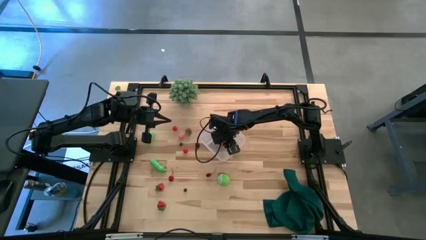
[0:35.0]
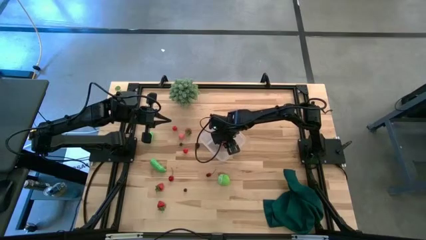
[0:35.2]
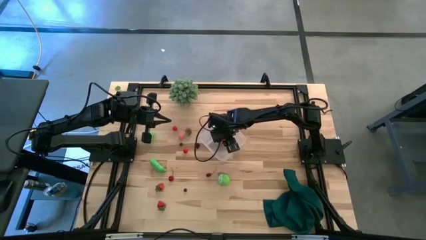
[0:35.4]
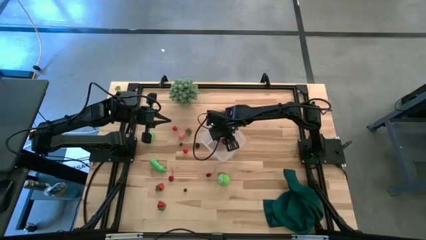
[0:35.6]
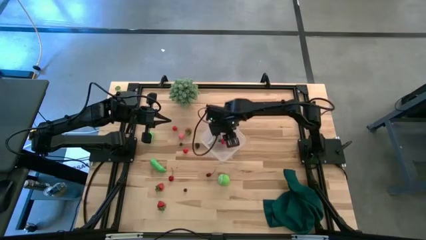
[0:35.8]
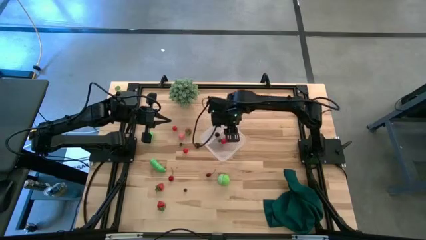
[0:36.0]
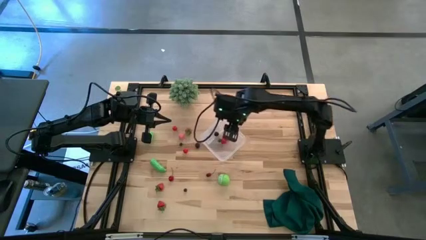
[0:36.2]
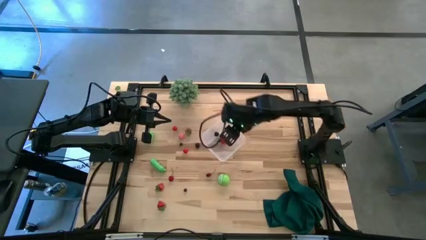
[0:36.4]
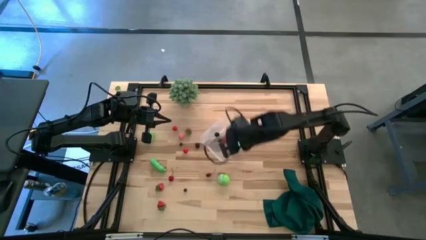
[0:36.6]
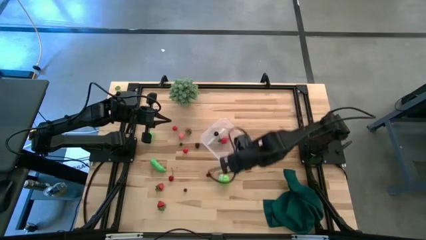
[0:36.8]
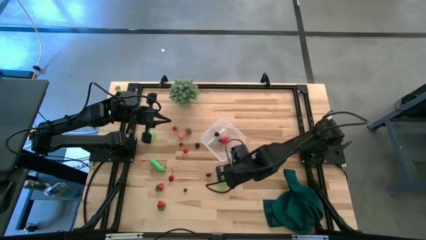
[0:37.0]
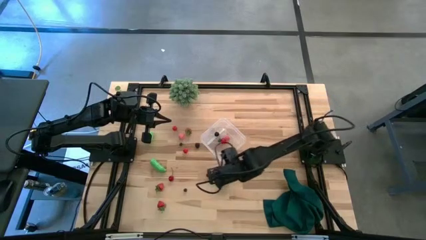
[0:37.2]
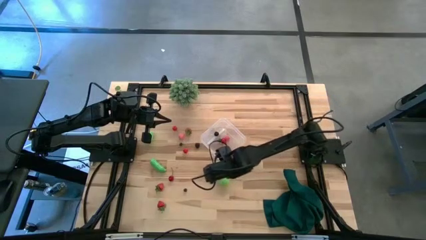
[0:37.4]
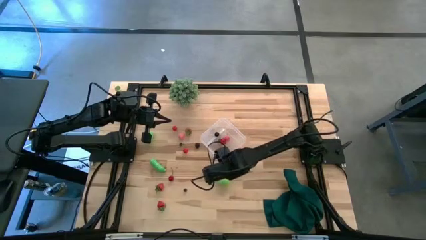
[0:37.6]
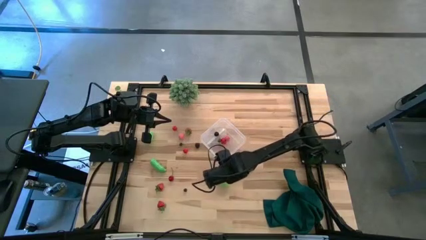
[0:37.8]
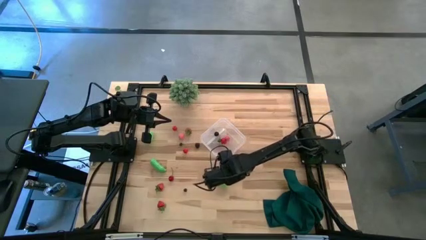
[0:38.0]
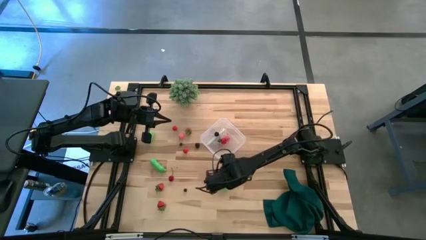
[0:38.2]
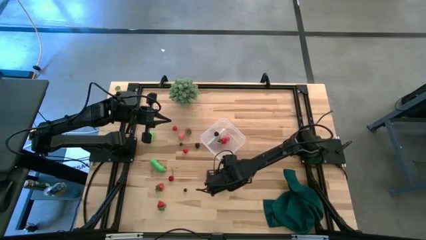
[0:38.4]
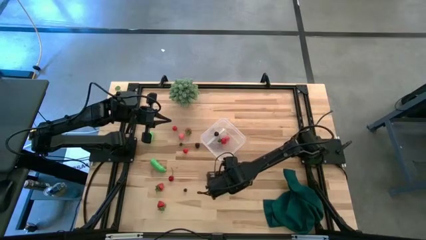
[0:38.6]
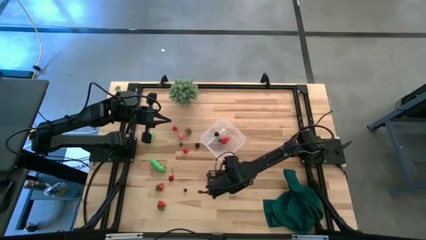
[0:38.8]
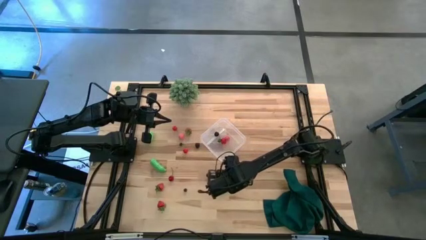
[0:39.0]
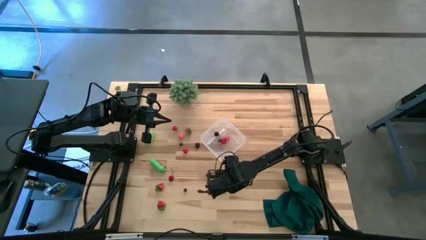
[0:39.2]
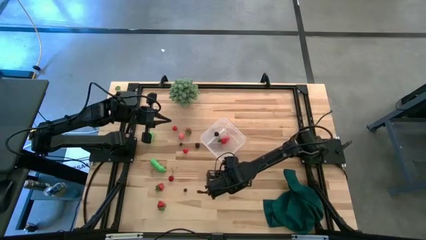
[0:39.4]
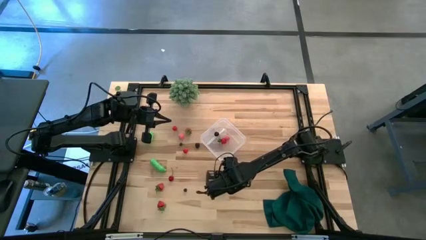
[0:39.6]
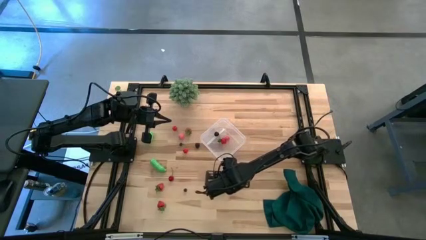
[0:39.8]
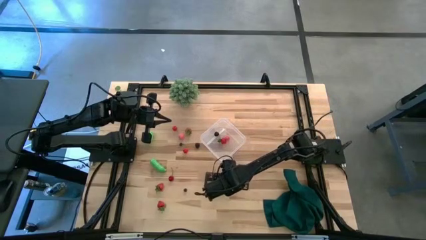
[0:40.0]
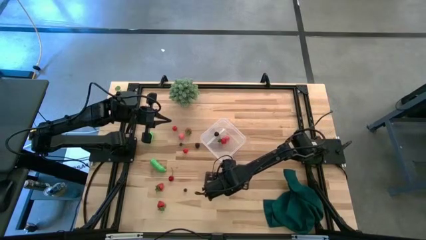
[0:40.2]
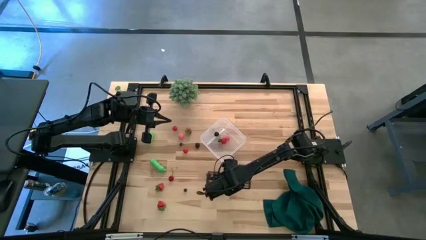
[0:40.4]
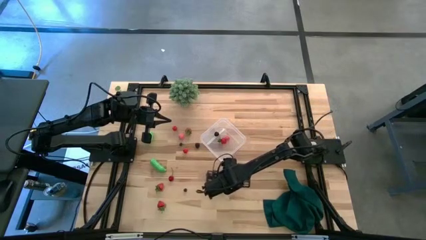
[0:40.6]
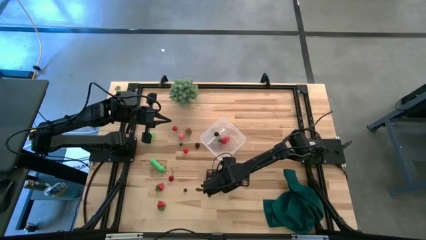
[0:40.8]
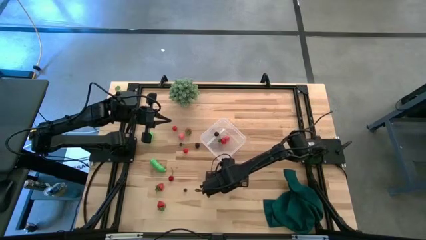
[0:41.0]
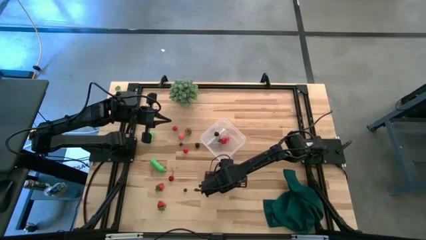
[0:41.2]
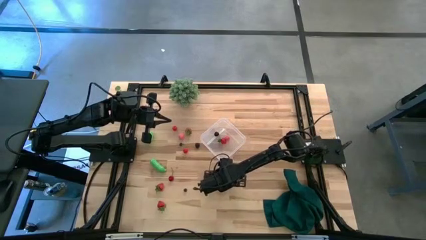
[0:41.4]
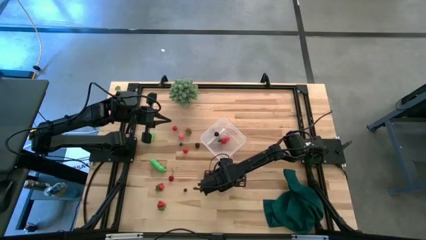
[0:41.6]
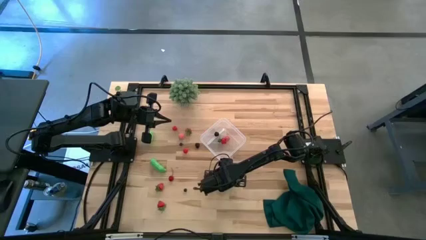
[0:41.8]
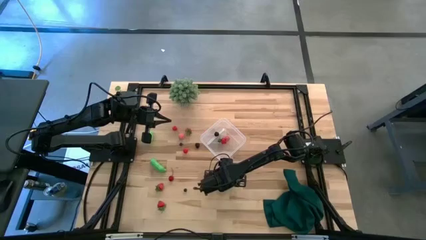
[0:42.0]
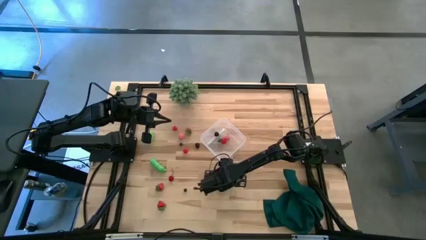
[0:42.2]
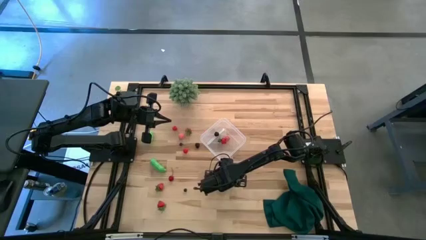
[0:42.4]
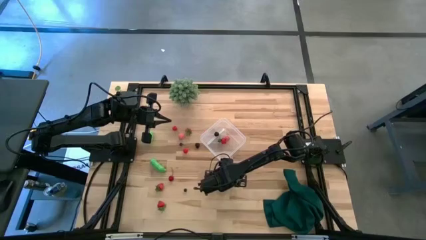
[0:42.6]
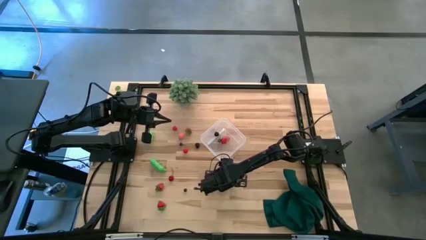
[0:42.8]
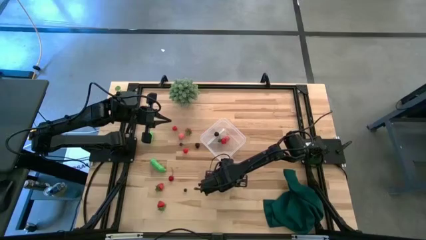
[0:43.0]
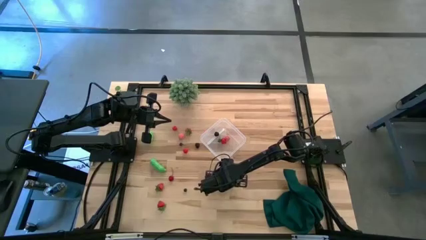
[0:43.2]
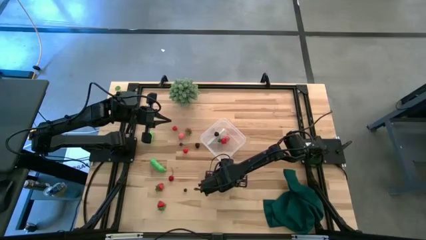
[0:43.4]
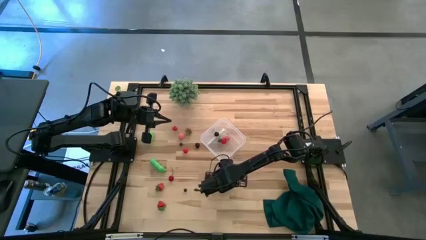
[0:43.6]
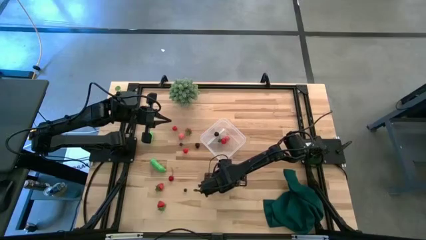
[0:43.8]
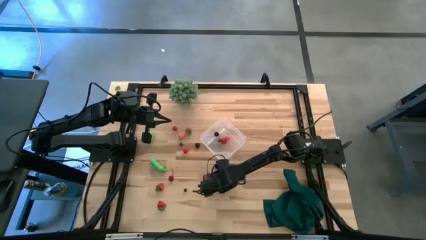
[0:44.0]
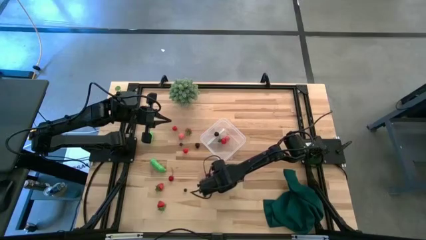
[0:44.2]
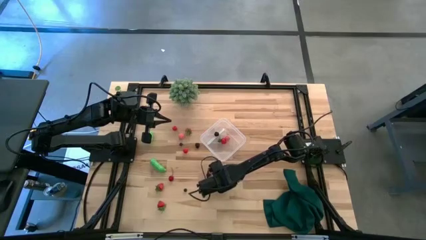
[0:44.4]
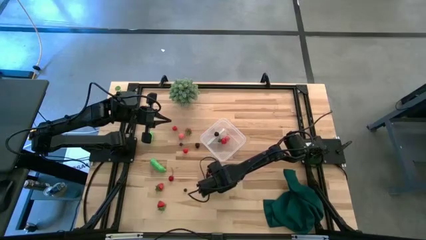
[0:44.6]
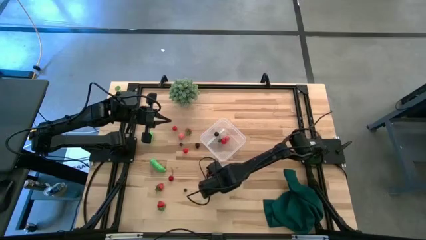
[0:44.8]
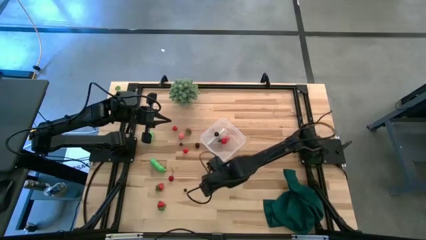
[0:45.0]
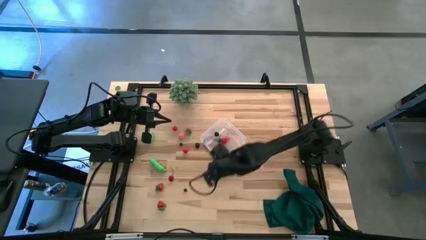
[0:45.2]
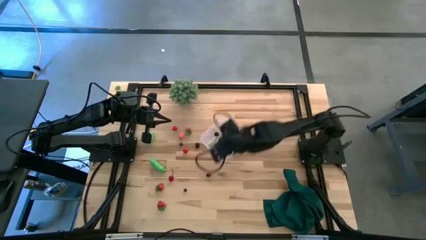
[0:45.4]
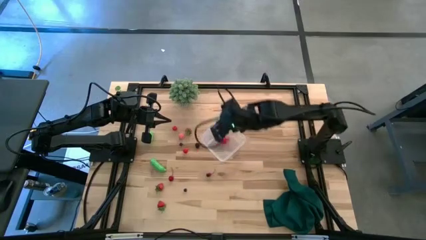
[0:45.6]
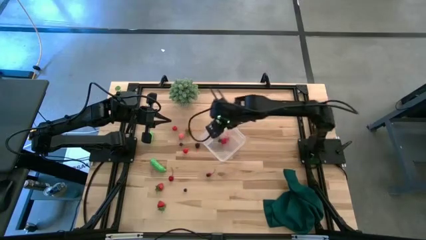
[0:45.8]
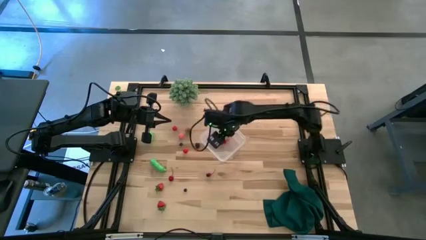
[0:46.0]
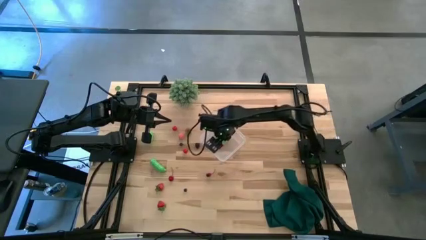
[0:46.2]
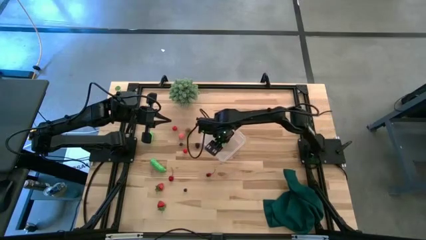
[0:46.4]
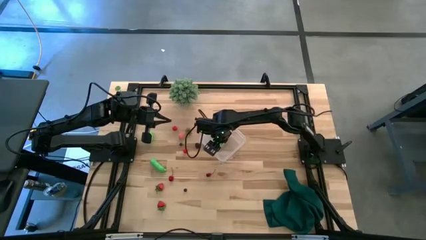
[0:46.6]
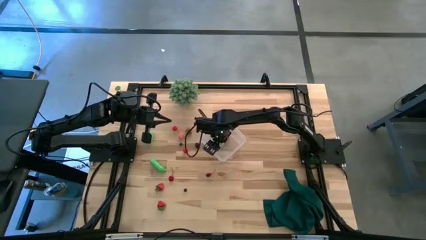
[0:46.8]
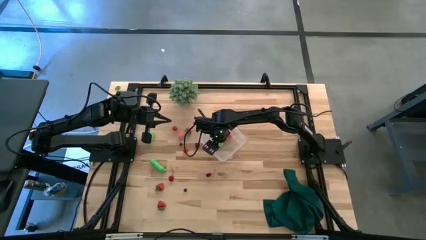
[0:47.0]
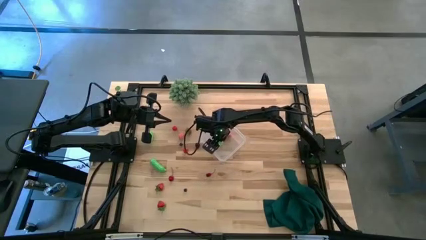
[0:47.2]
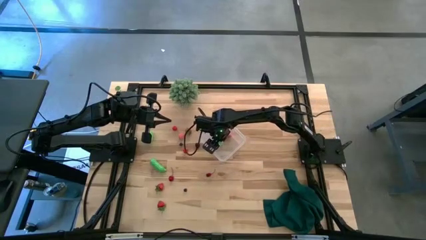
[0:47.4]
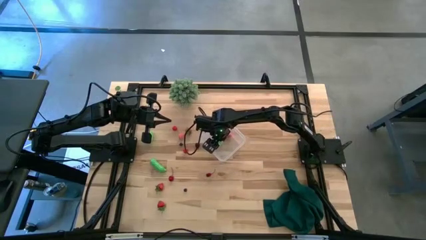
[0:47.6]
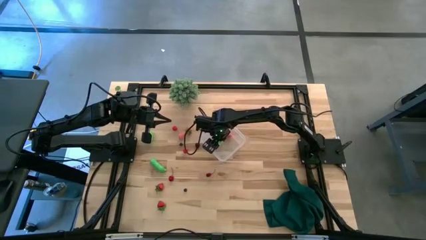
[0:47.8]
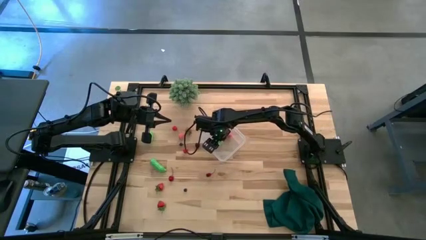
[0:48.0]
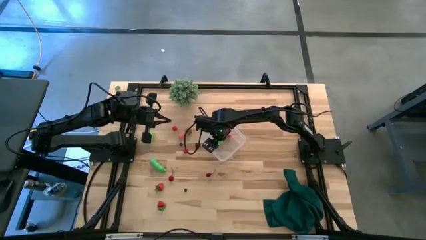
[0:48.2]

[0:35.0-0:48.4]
Task: Pick and placing Produce into tupperware
Put the green cabbage into the transparent bin

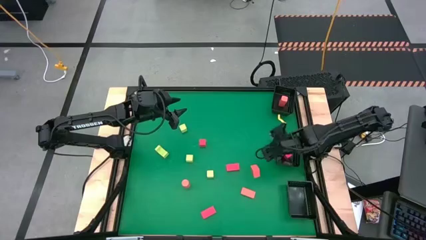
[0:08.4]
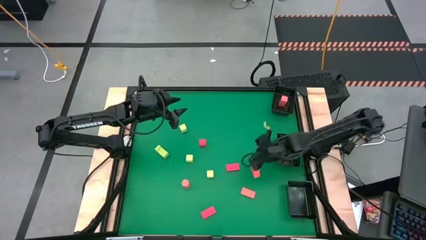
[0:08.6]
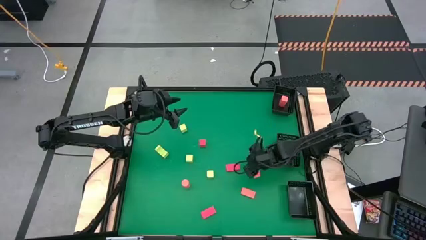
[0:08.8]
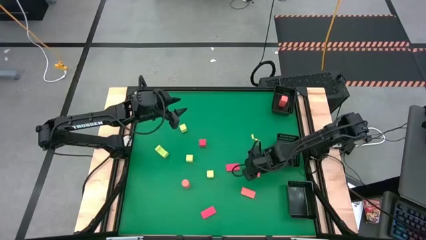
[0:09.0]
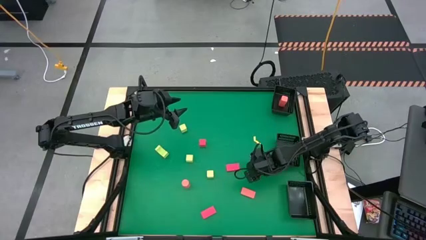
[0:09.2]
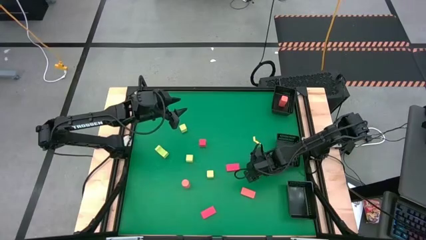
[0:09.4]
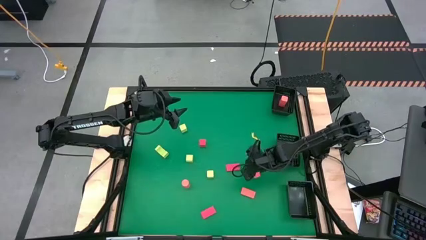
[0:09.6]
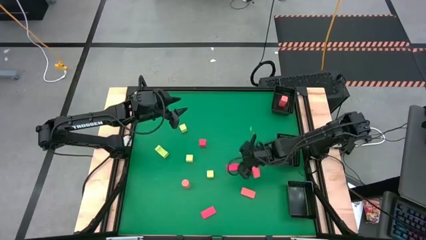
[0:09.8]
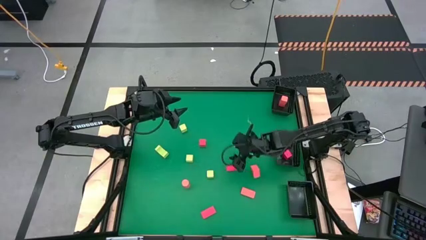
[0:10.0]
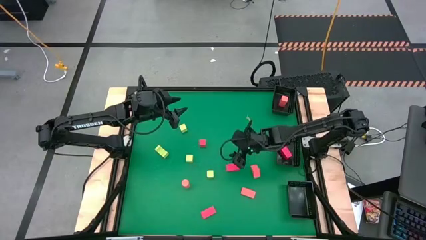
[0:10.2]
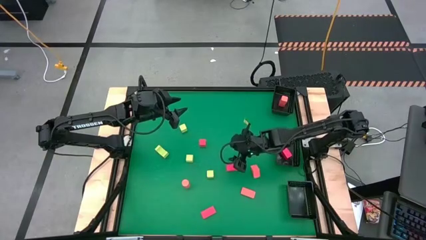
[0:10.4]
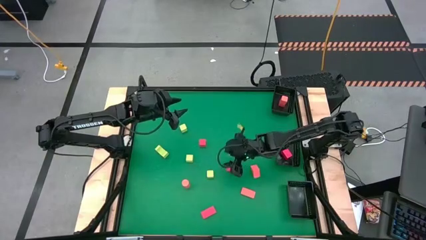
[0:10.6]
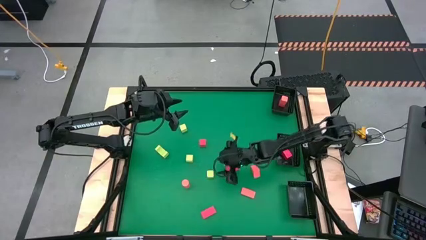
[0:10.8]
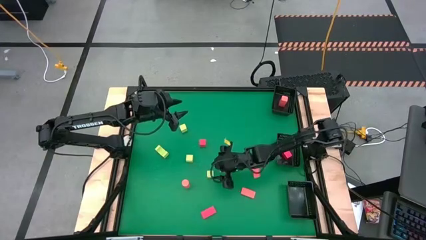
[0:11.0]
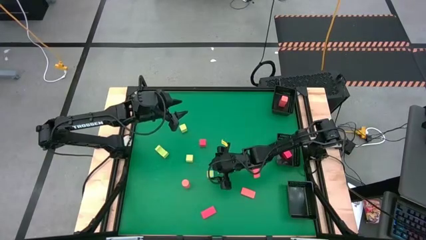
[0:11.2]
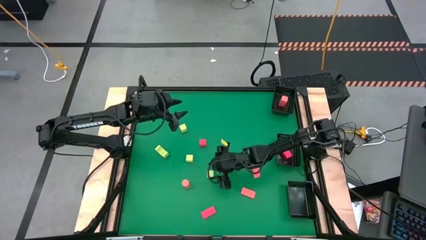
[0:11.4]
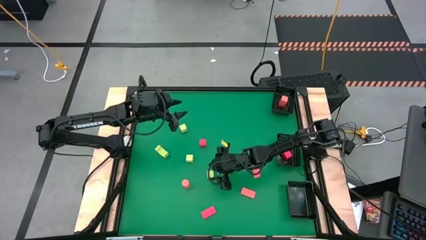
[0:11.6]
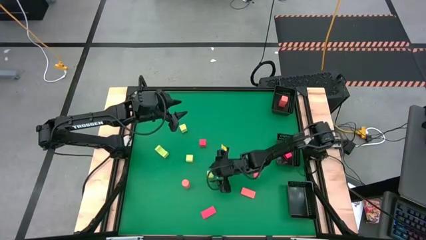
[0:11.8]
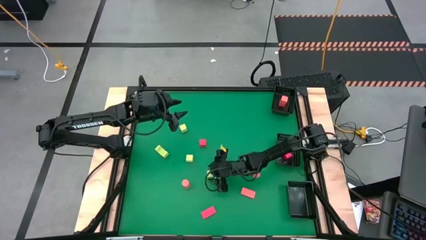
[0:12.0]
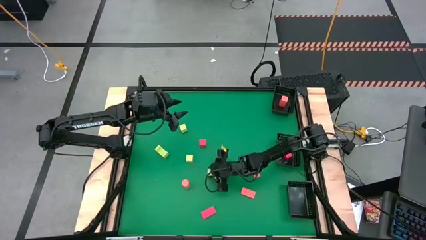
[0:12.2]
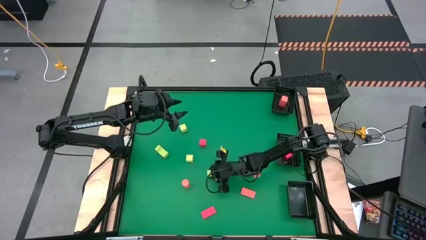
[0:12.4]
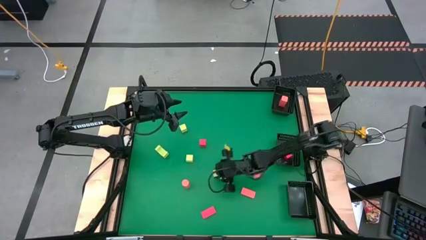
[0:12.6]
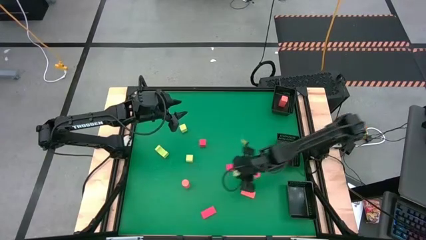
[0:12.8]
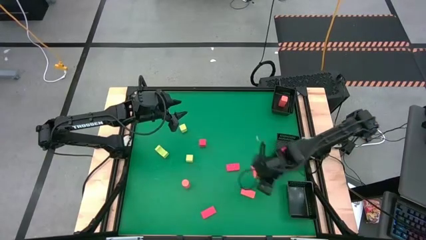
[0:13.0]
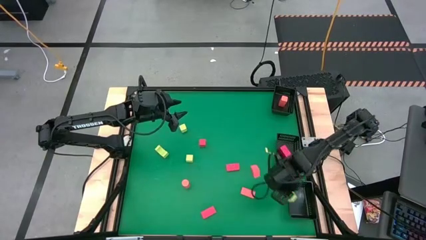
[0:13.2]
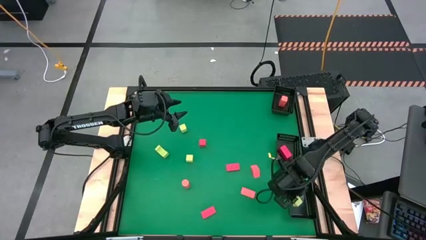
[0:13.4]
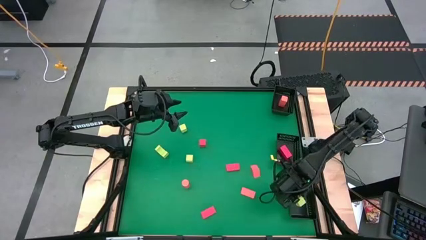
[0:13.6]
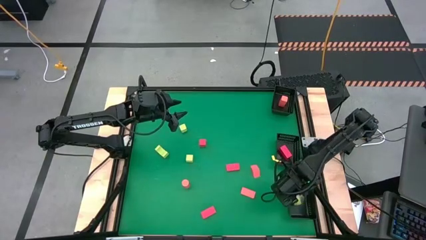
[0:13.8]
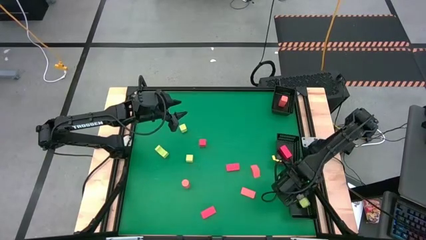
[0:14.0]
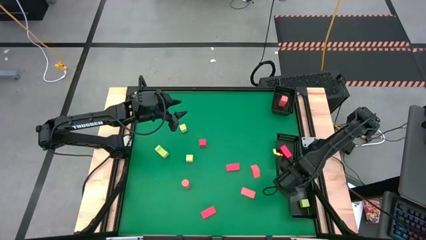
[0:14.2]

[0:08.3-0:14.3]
Task: Sort & place blocks by color
Put the bottom right yellow block into the bottom right black bin
